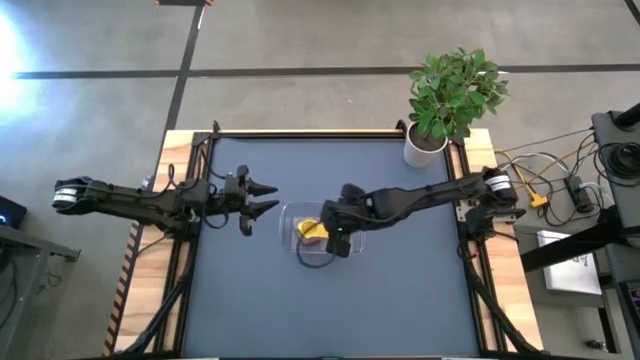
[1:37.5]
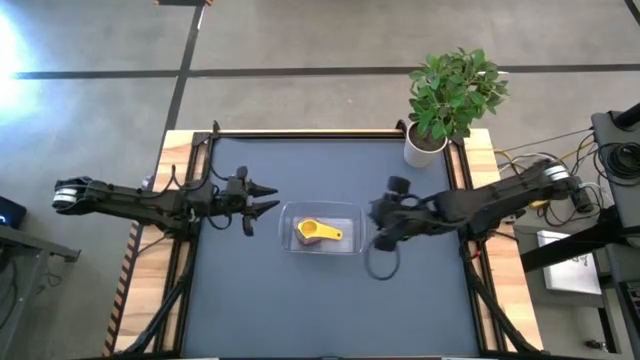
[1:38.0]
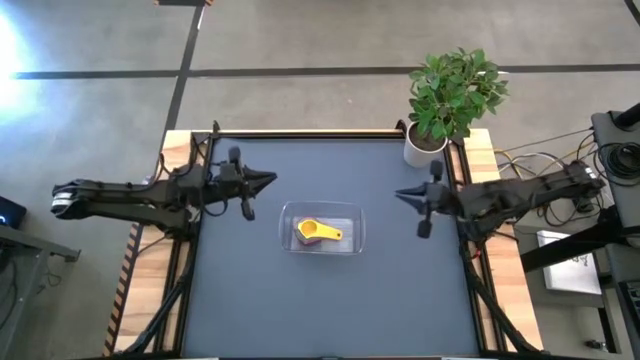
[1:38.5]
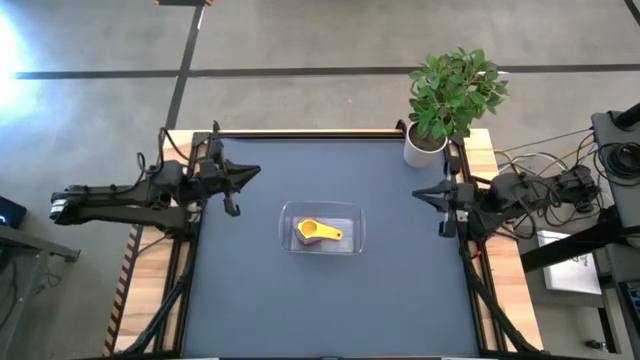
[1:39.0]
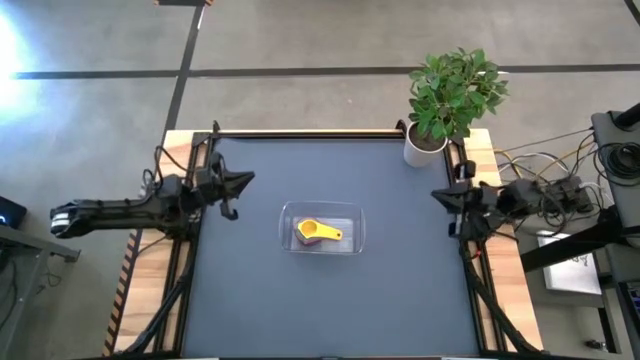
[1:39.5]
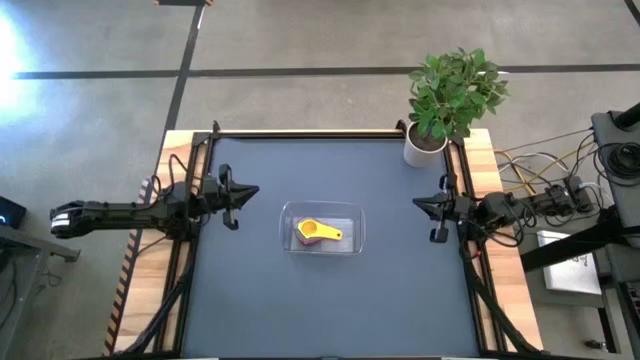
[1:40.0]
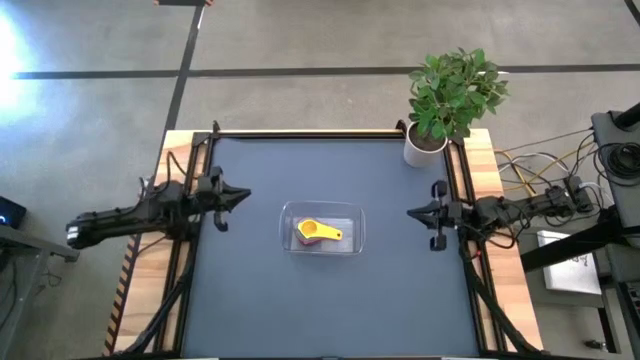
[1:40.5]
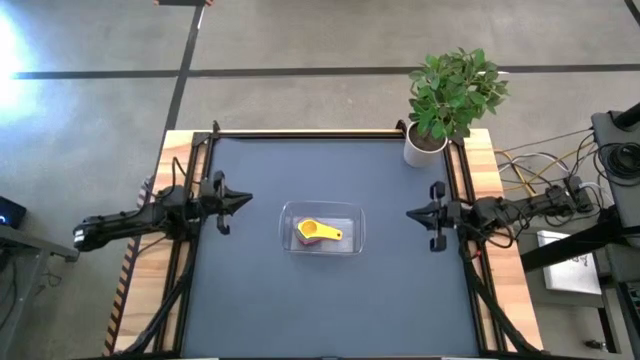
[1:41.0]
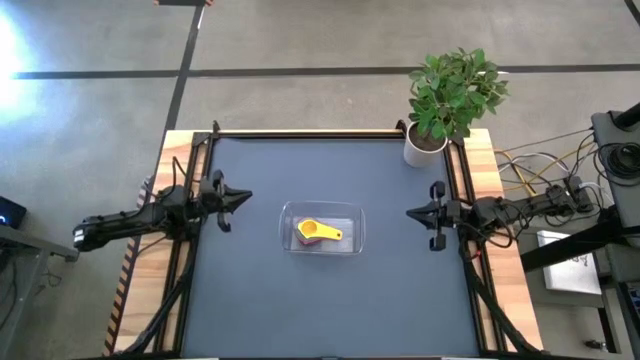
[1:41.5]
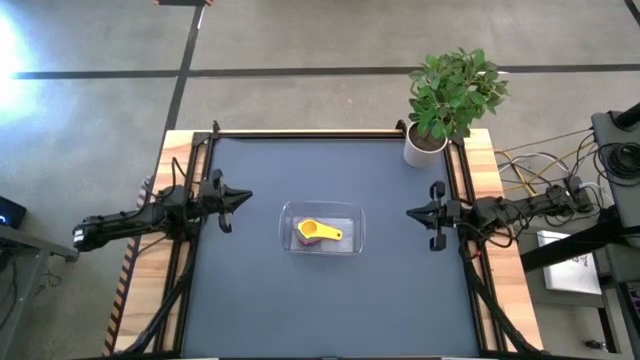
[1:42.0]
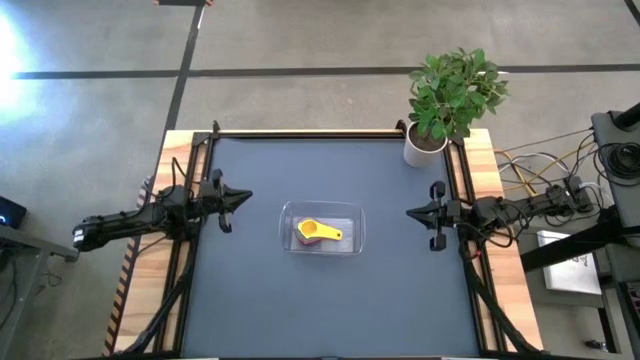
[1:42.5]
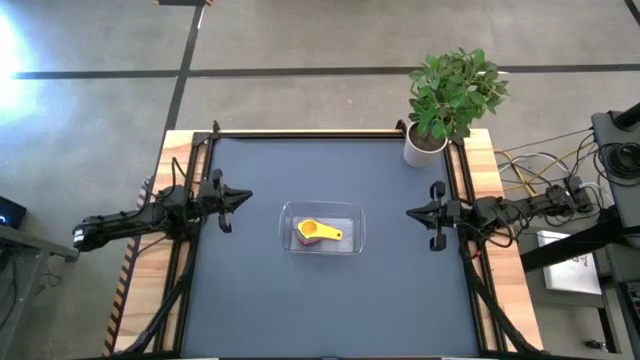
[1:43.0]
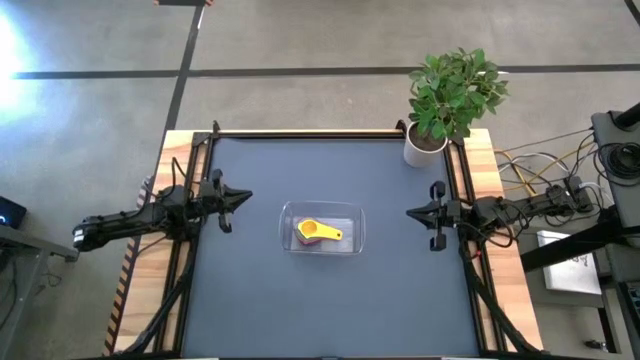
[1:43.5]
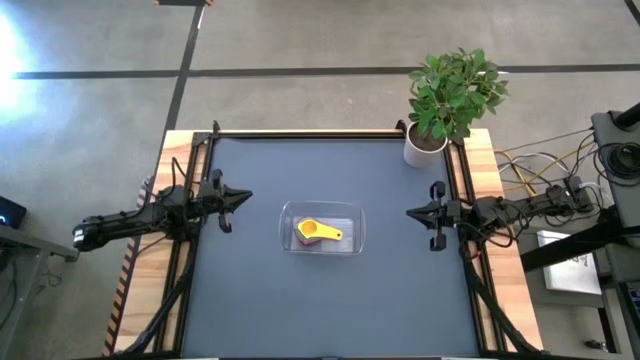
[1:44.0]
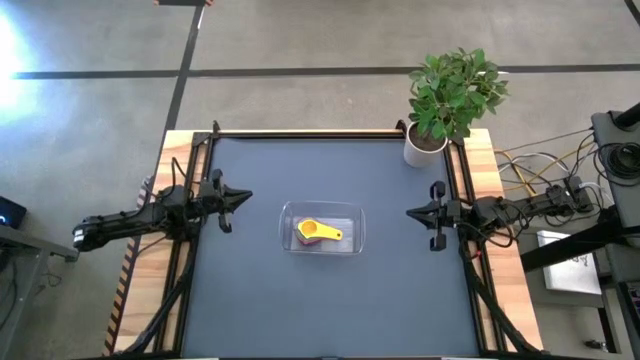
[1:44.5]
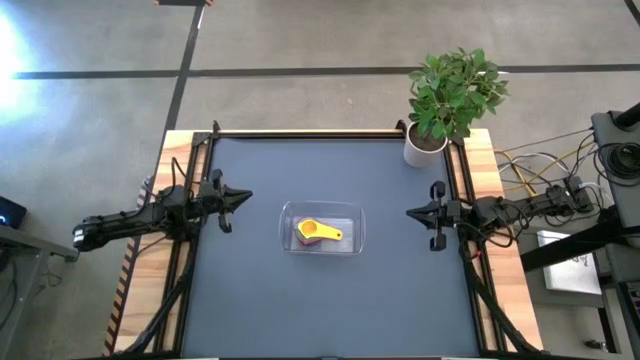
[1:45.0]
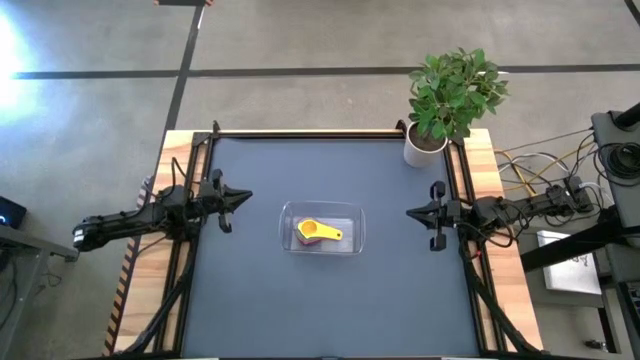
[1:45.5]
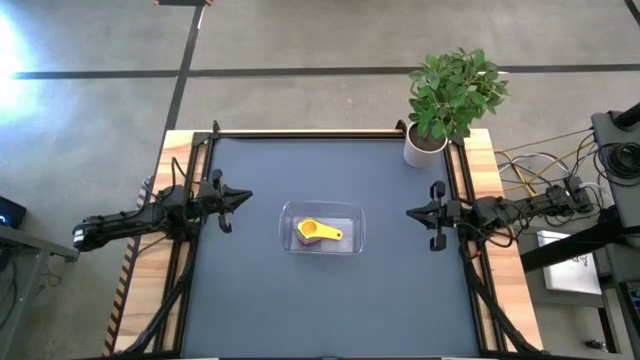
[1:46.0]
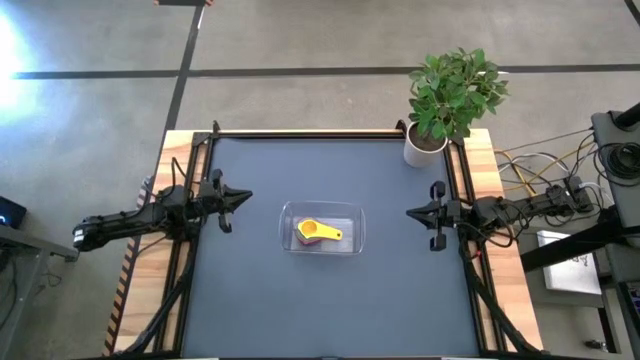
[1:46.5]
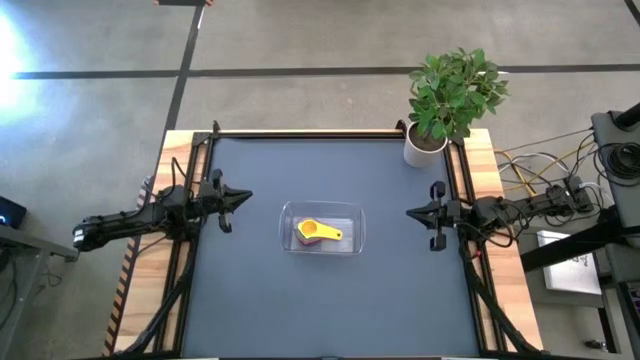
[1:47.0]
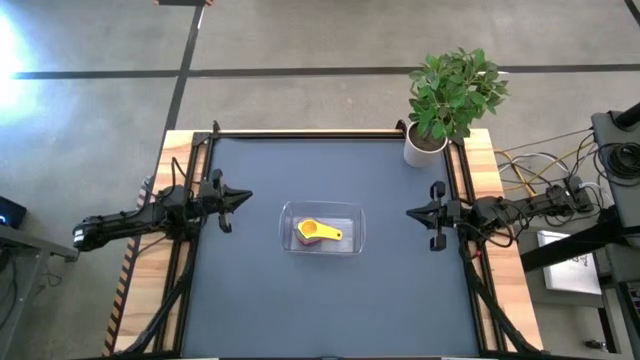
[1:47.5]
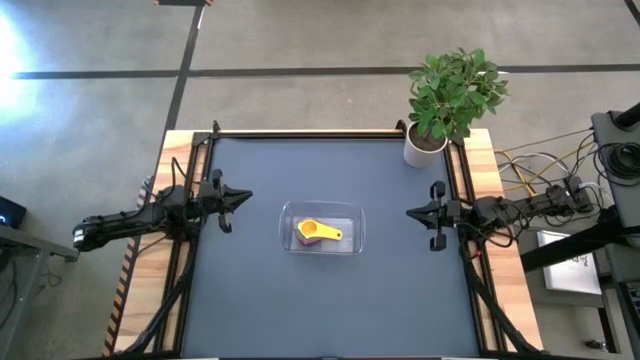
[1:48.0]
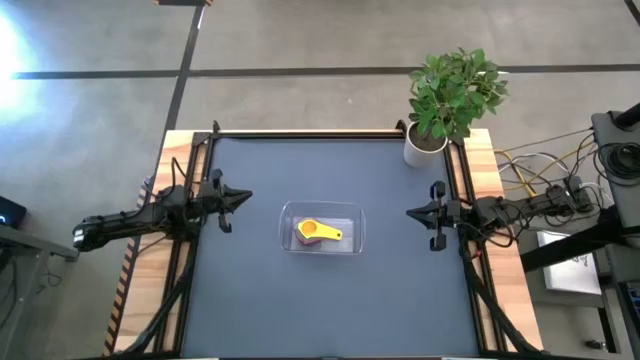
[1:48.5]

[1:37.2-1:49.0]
Task: Nest measuring cups in basket
Return to Home Position

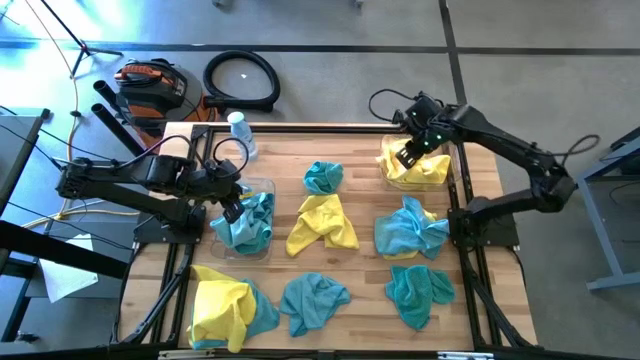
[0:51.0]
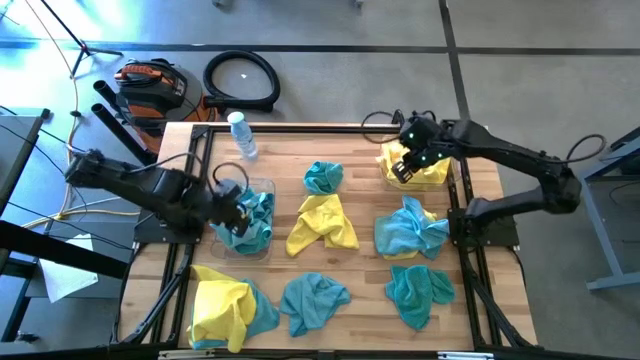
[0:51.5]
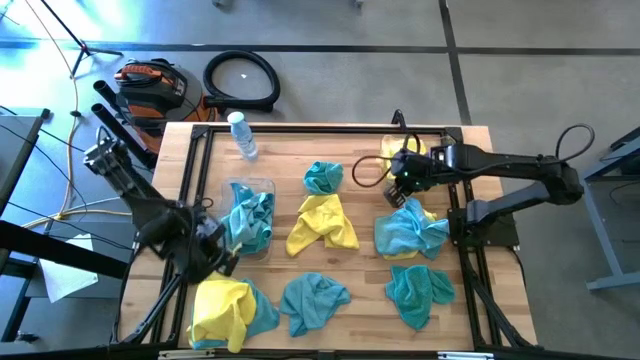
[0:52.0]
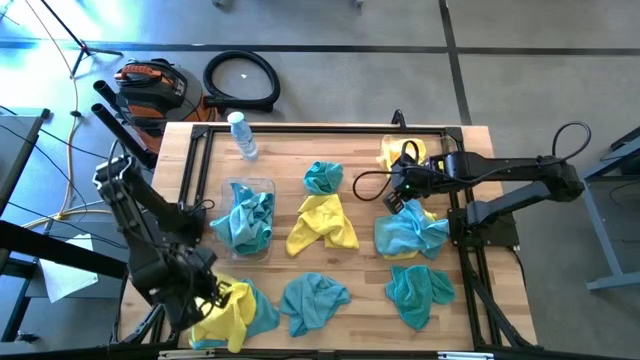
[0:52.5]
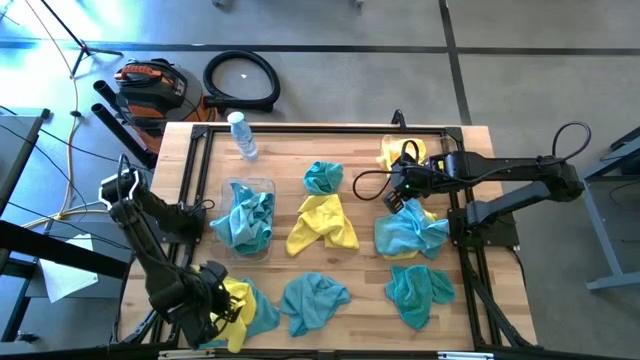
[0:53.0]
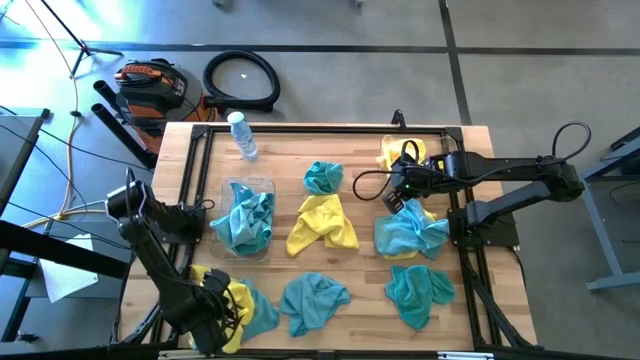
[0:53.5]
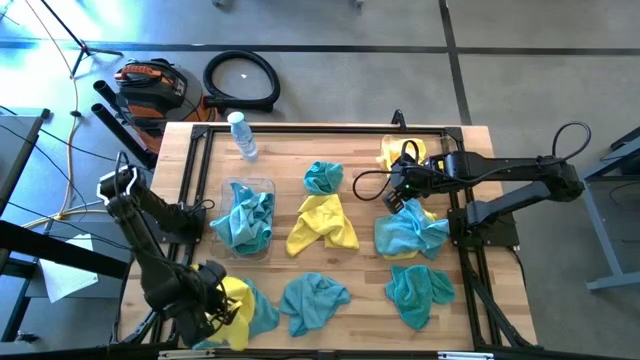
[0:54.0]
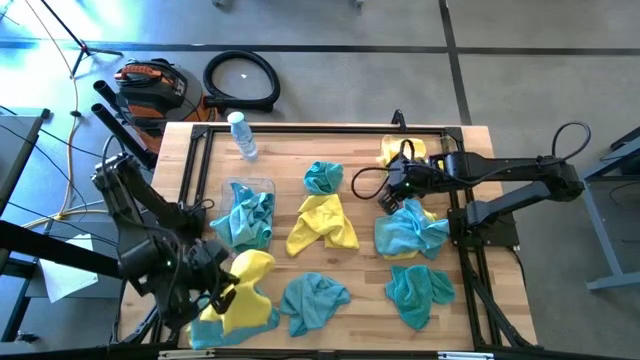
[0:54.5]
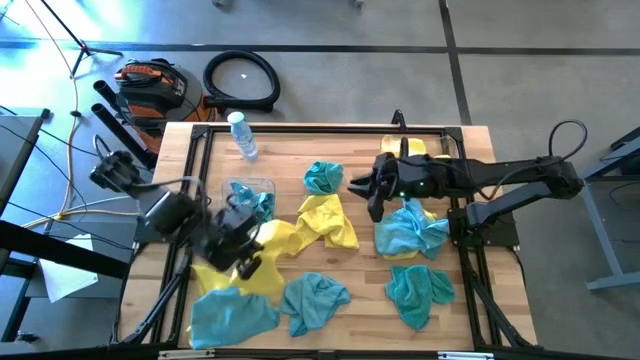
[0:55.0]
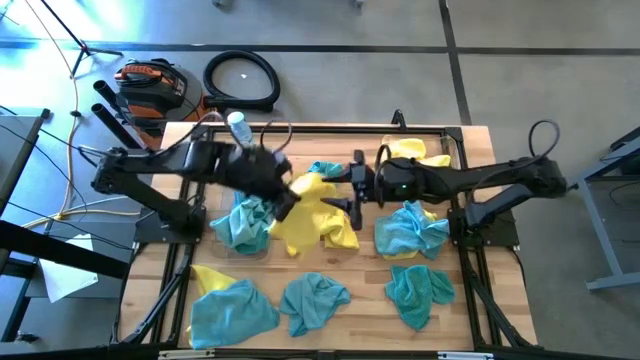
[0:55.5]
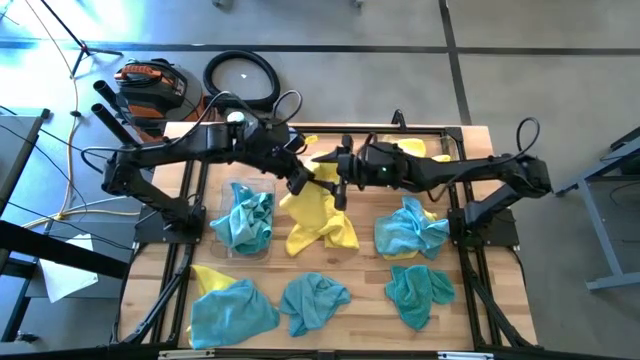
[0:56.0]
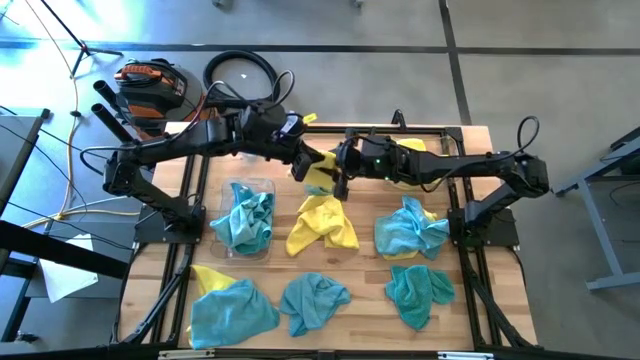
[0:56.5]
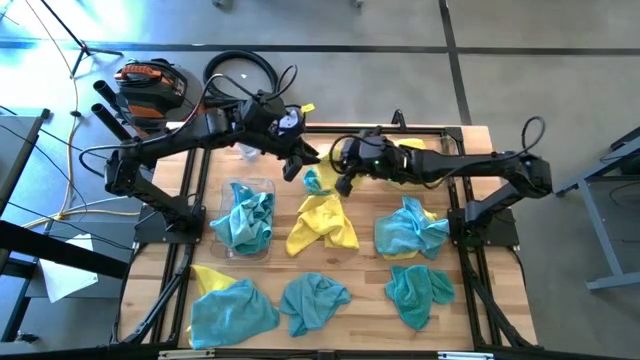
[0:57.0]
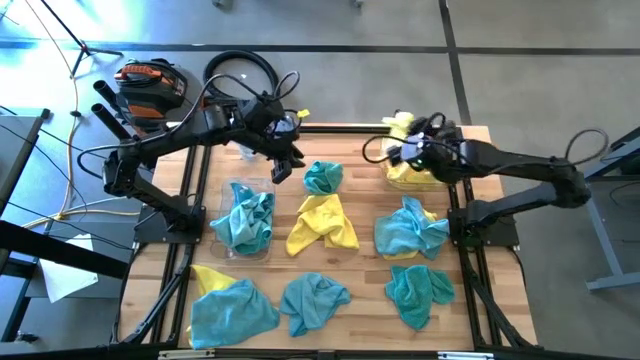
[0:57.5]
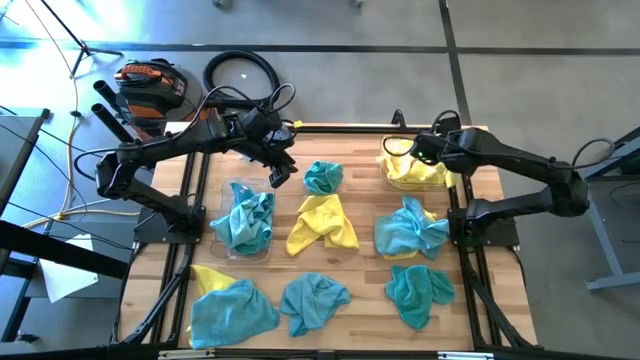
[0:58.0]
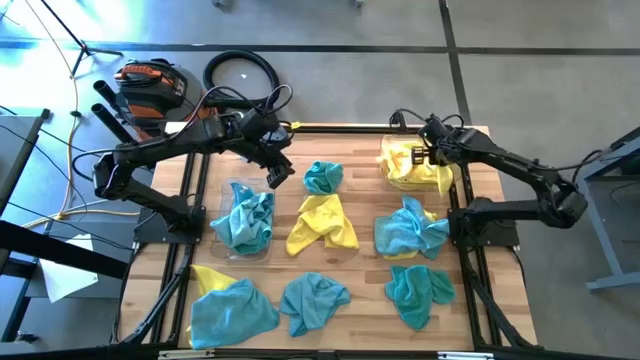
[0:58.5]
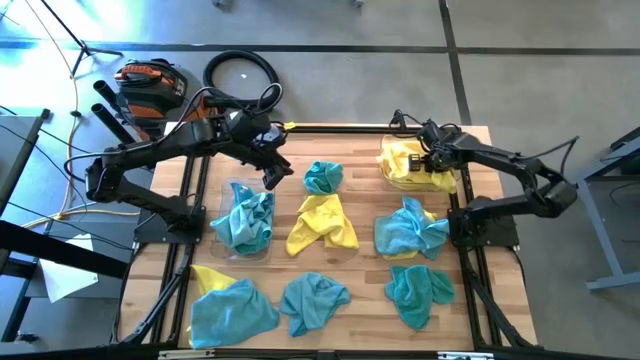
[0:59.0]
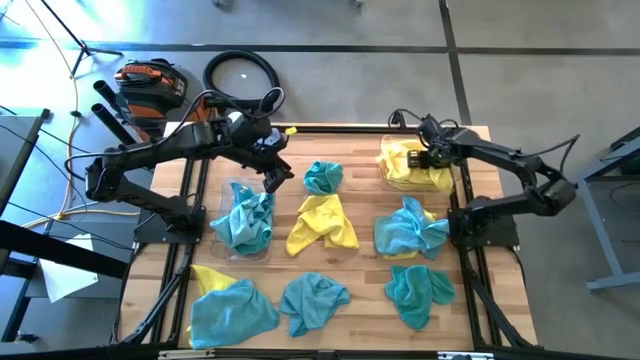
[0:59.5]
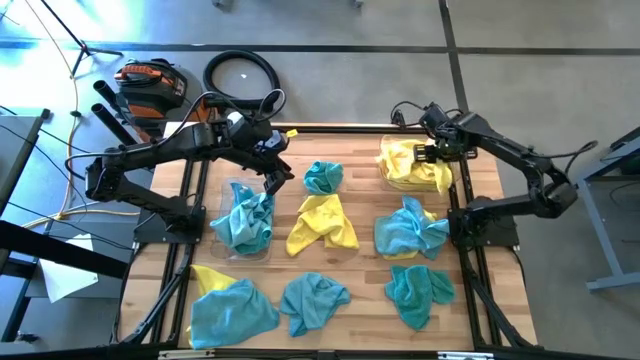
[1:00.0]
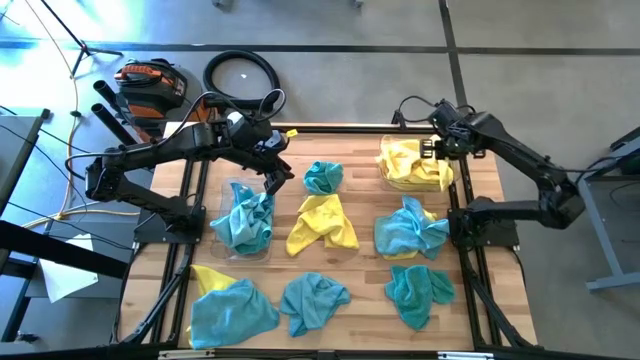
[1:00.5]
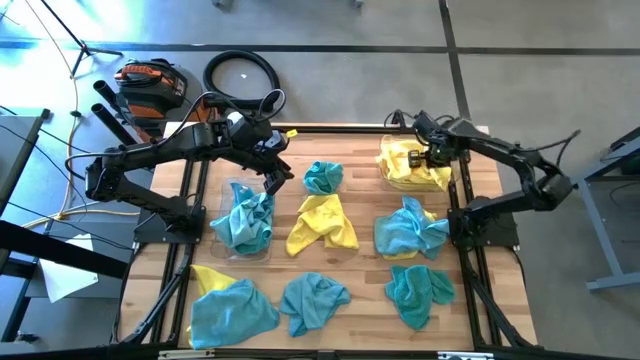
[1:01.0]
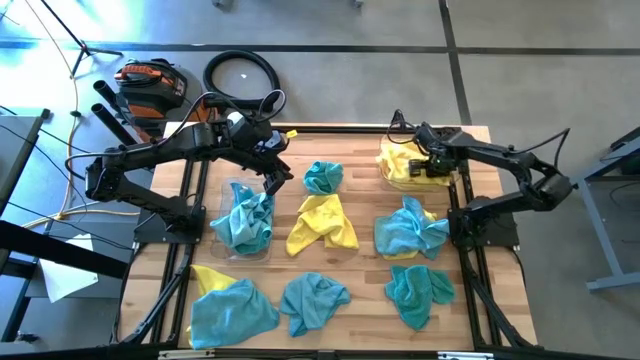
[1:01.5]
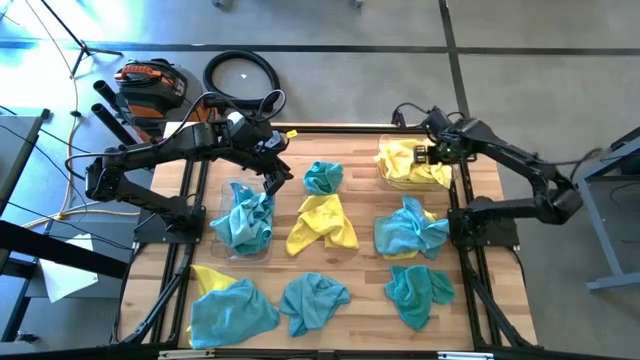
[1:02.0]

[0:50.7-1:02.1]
Task: Sort microfiber towel by color & place in baskets
Put the yellow microfiber cloth into the right transparent bin
